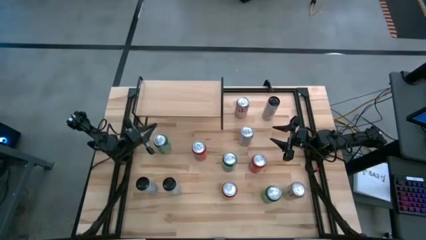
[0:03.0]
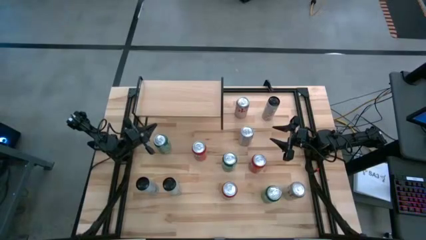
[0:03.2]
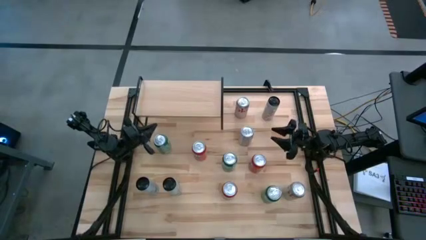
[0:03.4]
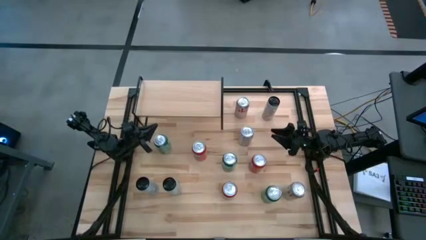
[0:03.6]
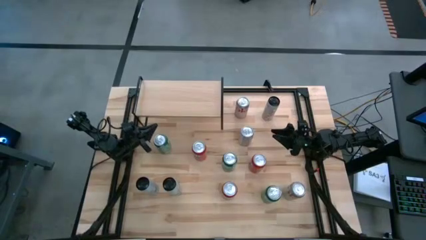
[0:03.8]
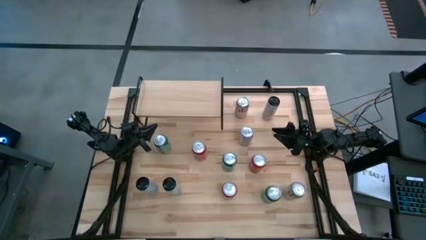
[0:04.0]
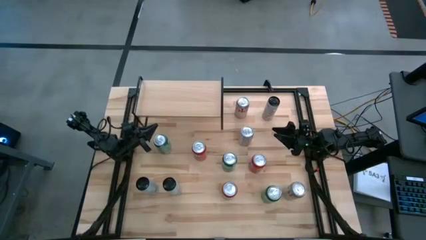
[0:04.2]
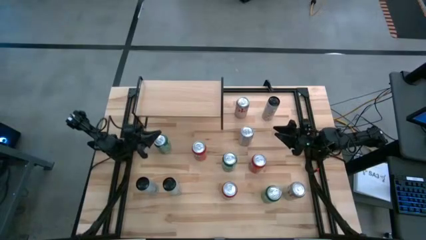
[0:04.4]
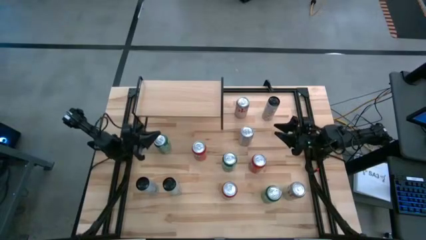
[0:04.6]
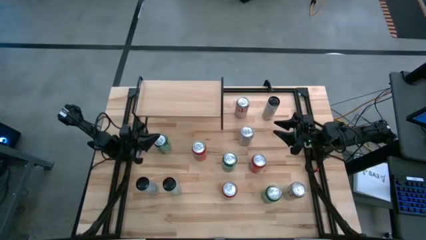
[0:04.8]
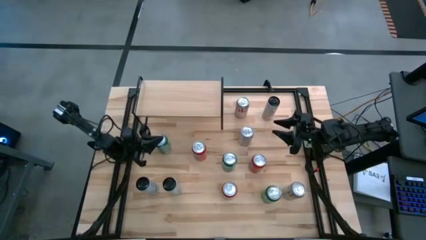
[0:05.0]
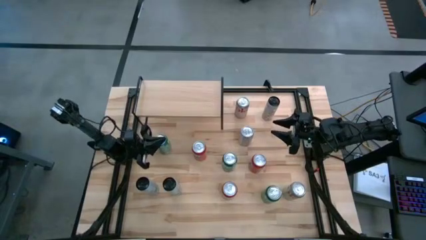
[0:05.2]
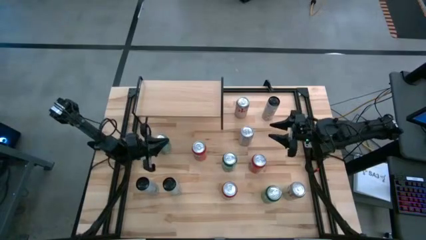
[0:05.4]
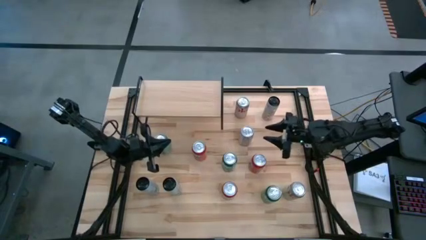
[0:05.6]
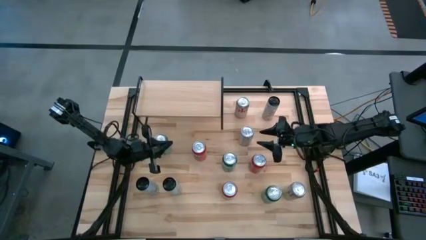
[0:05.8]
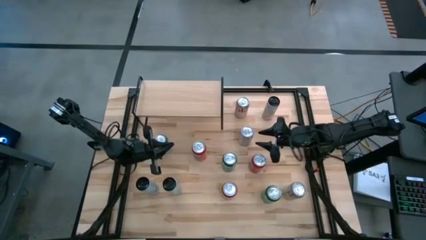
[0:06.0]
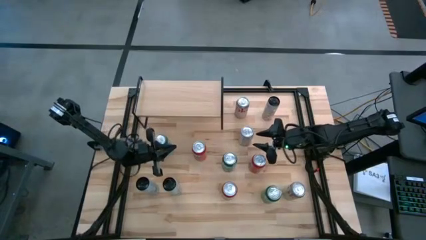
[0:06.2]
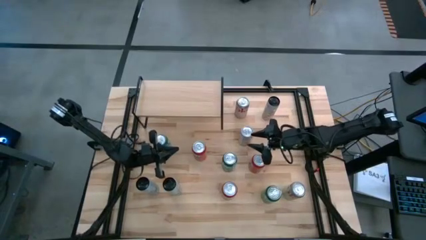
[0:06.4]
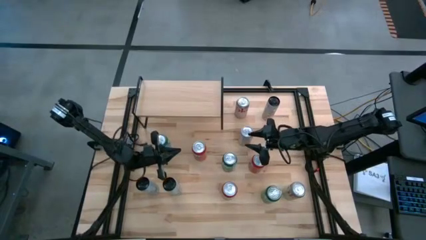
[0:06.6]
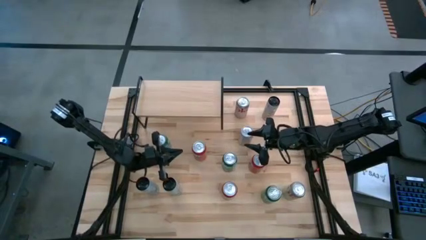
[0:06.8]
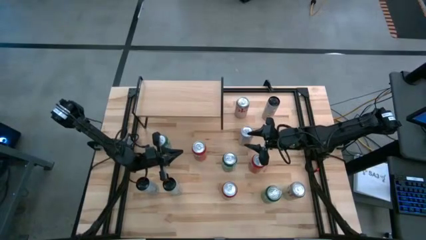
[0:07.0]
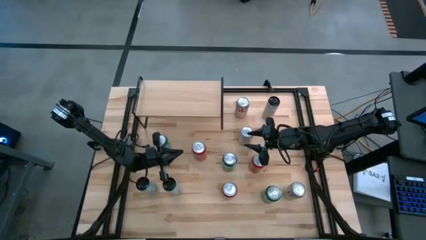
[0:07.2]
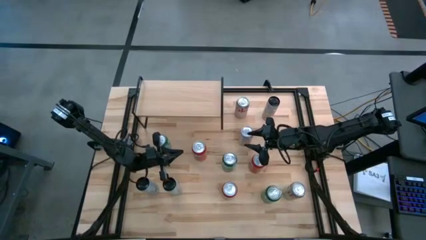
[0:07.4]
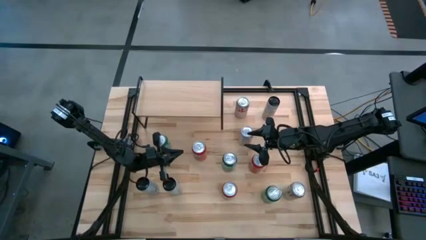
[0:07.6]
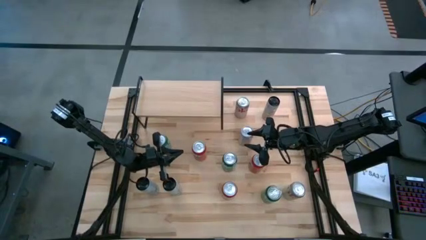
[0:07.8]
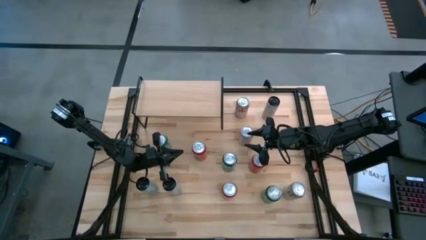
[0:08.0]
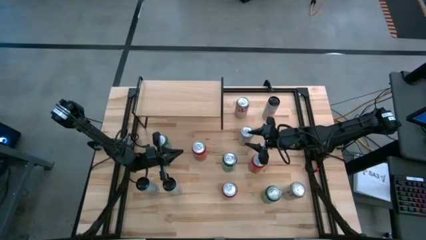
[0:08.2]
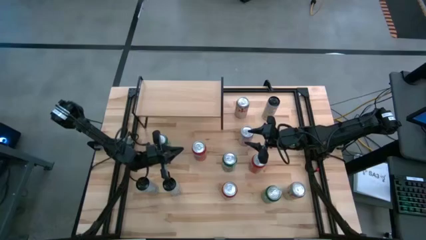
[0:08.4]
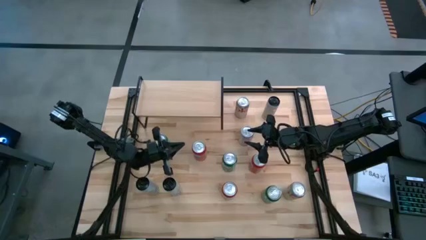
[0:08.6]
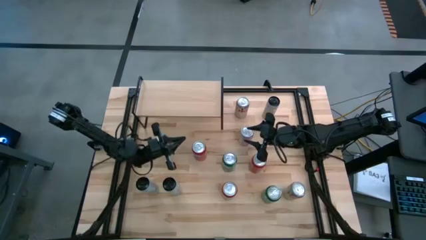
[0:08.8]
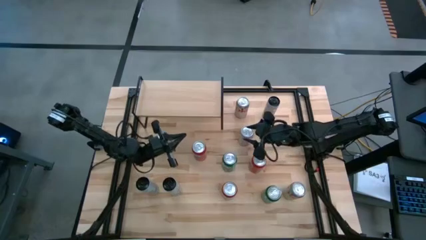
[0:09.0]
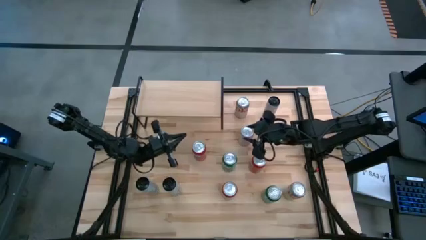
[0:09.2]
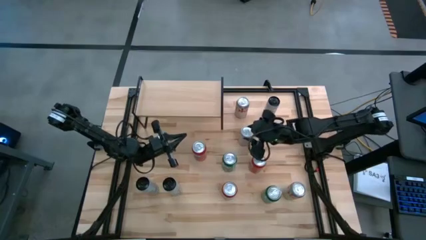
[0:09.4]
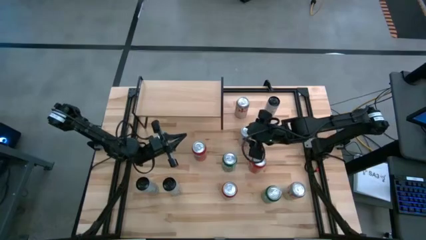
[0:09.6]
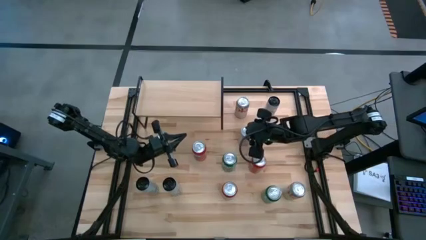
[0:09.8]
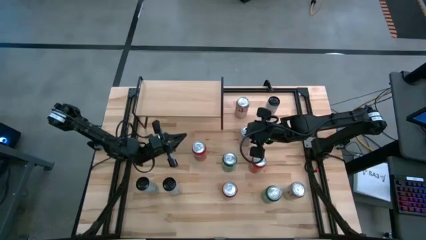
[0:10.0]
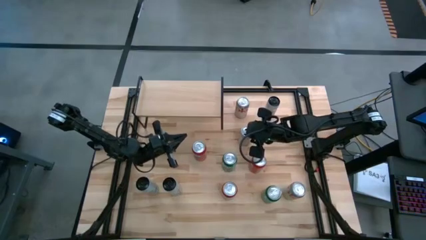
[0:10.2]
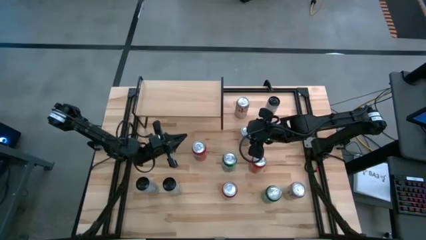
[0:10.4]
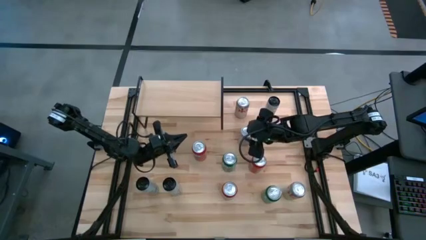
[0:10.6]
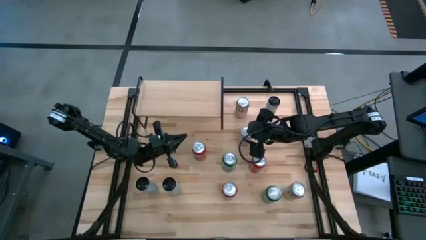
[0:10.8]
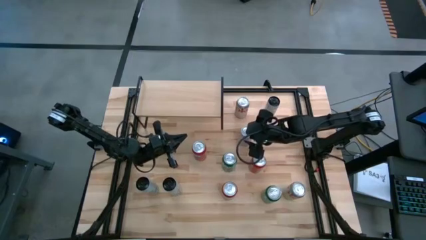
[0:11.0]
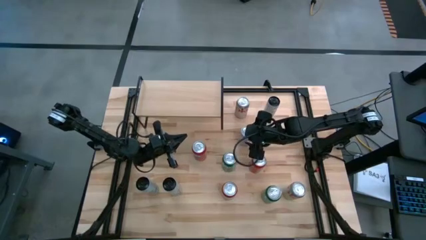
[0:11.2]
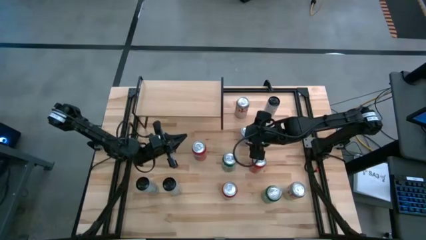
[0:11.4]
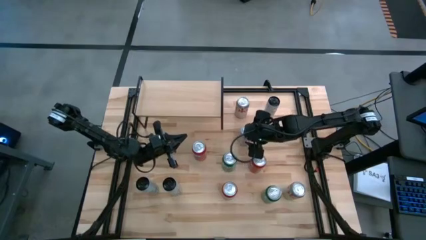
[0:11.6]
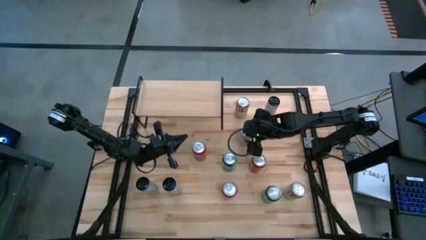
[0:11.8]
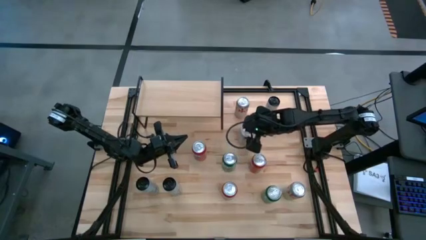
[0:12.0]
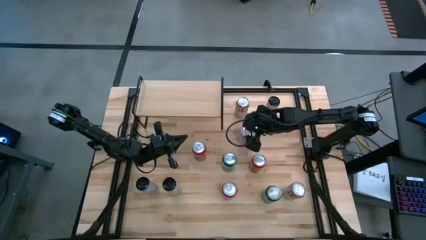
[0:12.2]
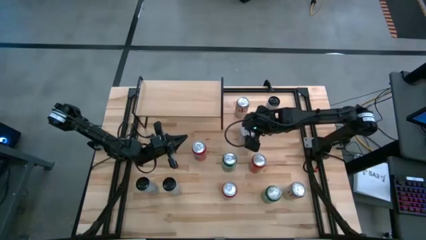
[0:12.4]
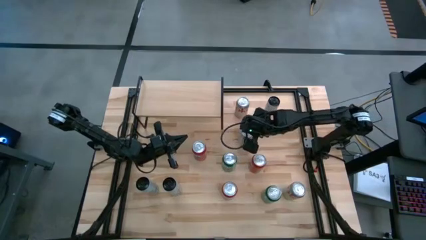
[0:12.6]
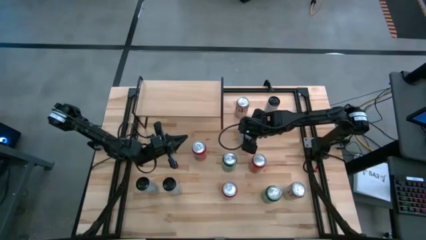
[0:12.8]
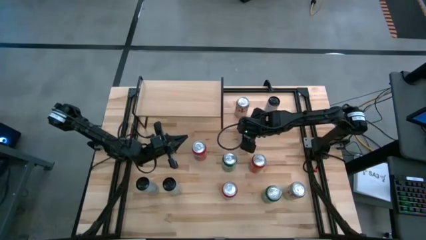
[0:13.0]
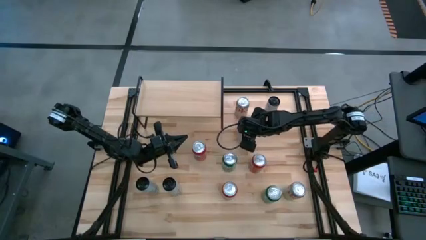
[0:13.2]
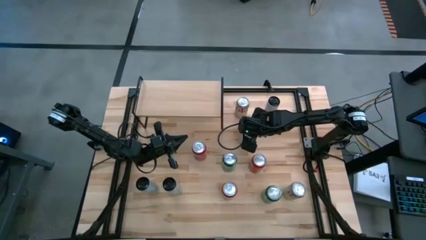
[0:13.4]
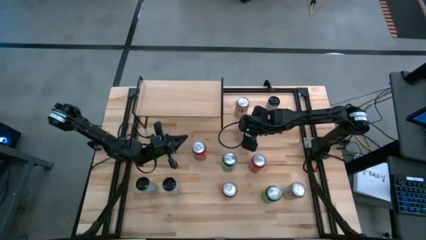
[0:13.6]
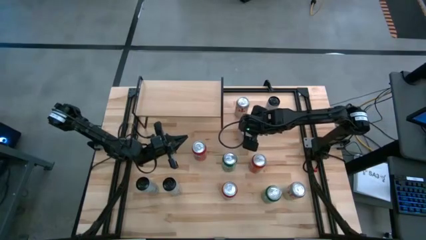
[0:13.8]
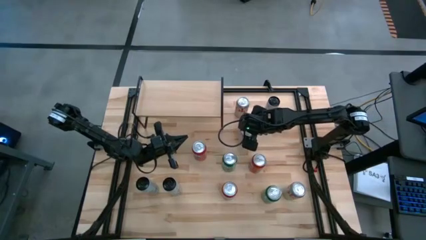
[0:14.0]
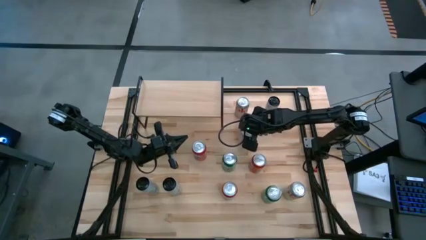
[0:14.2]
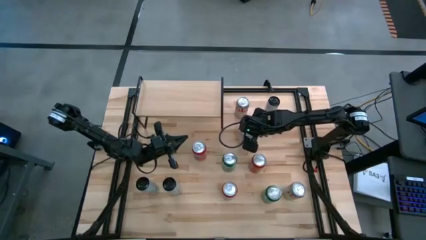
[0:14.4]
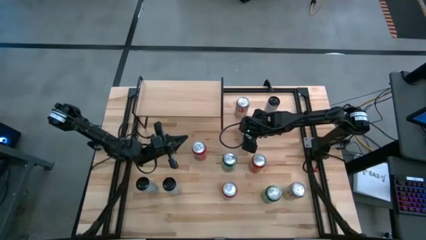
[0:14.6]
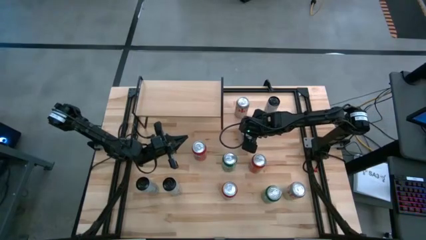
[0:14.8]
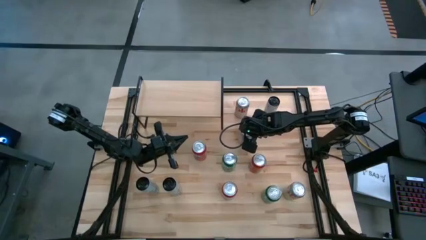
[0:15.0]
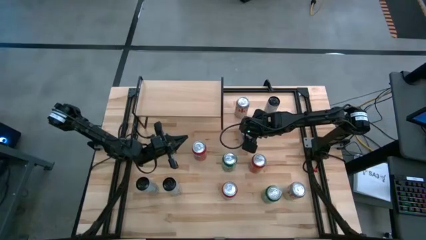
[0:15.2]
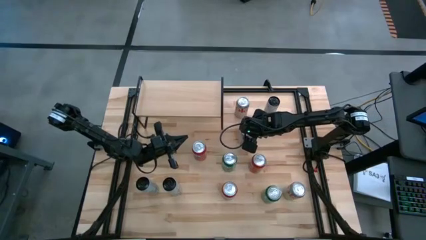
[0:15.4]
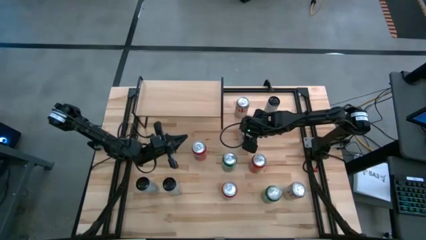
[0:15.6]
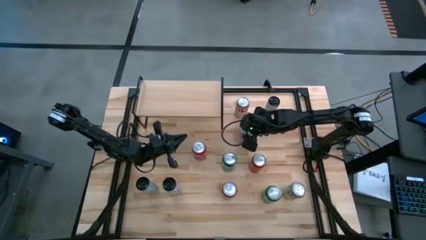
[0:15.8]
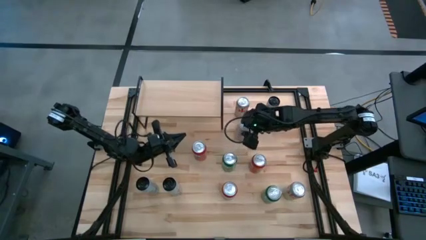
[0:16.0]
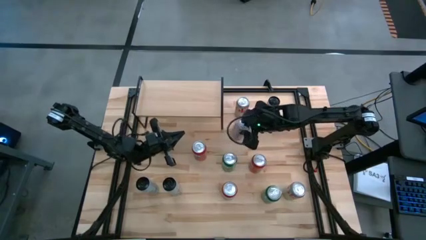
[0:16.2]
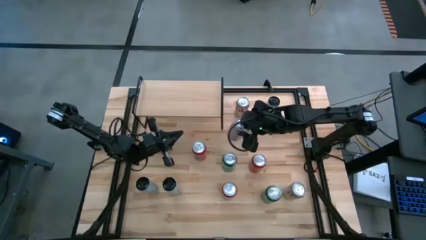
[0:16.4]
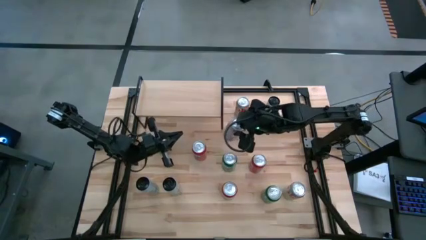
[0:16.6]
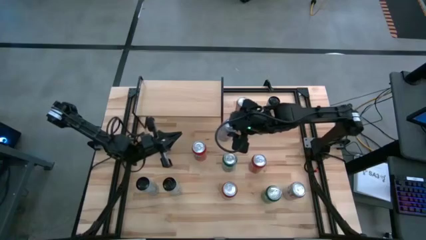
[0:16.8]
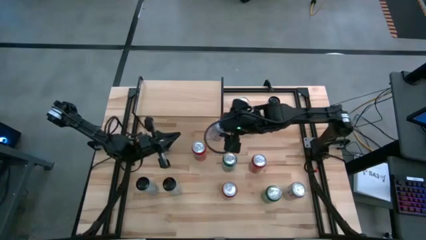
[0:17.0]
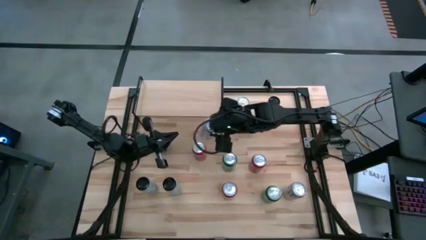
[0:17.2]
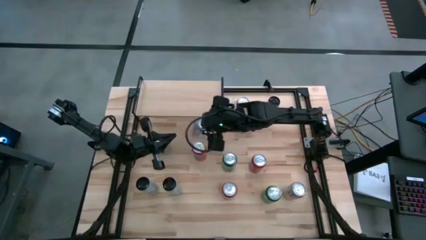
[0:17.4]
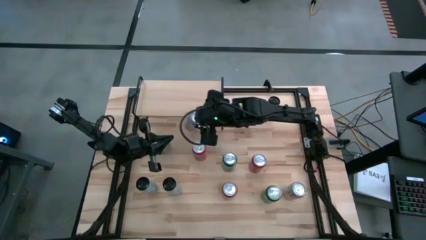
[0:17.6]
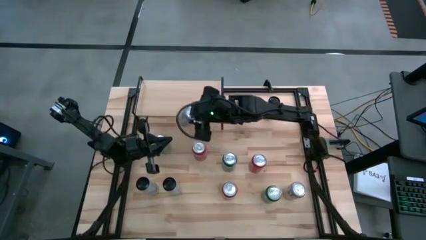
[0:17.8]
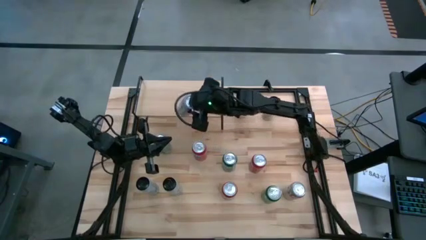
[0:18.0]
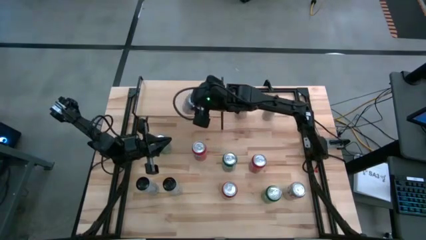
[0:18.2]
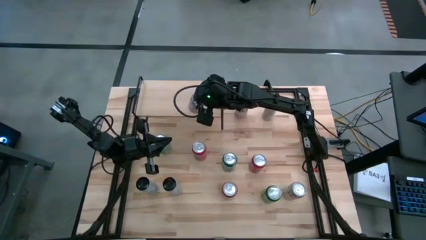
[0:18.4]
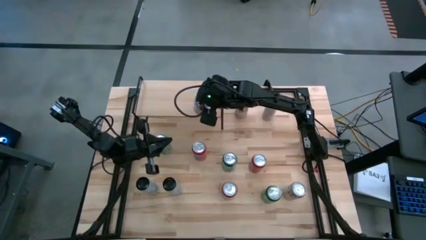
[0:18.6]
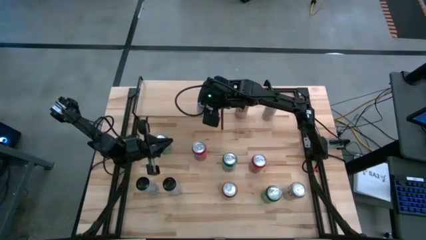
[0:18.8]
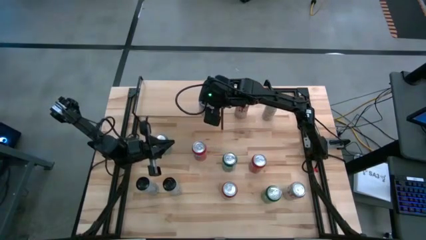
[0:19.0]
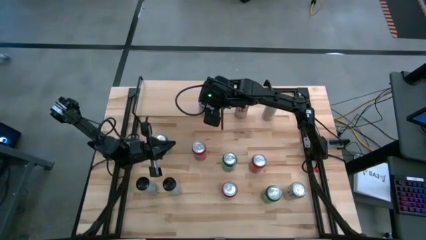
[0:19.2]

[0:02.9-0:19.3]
Task: Place canned beverage on shelf
Put the middle silver soda can on the shelf
